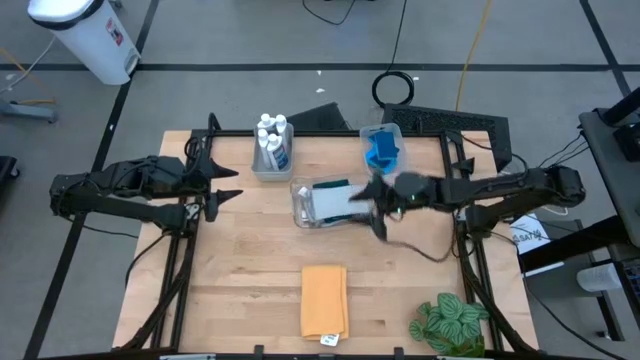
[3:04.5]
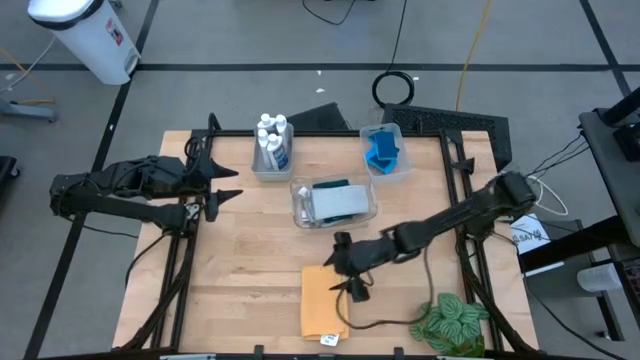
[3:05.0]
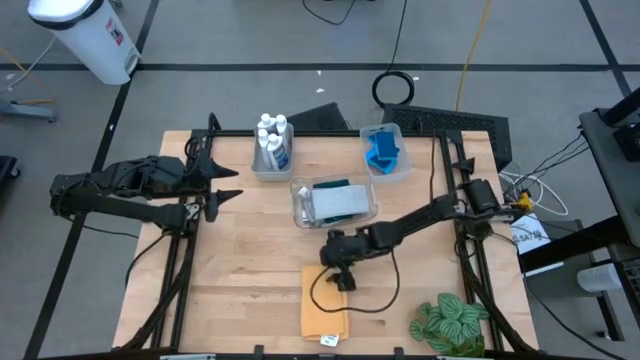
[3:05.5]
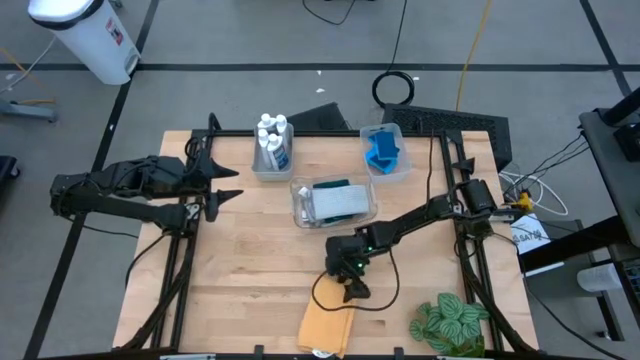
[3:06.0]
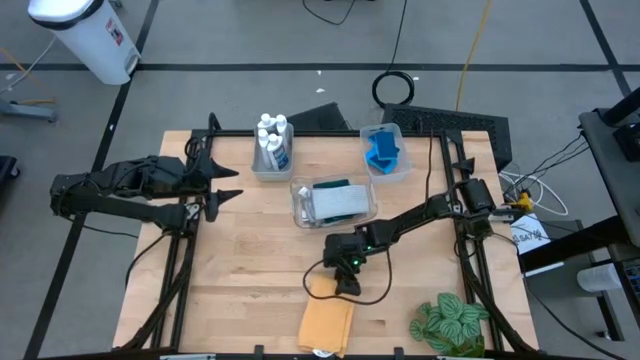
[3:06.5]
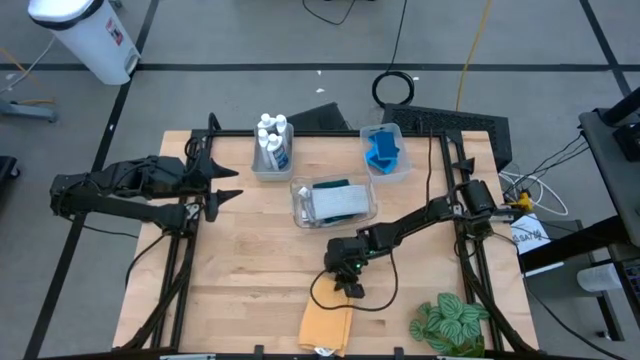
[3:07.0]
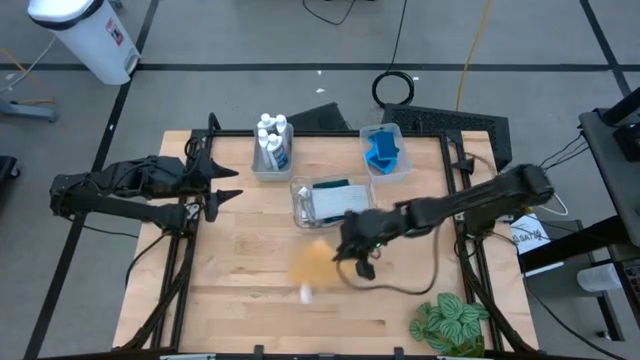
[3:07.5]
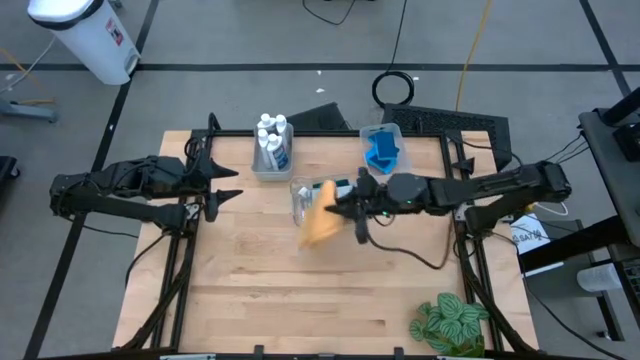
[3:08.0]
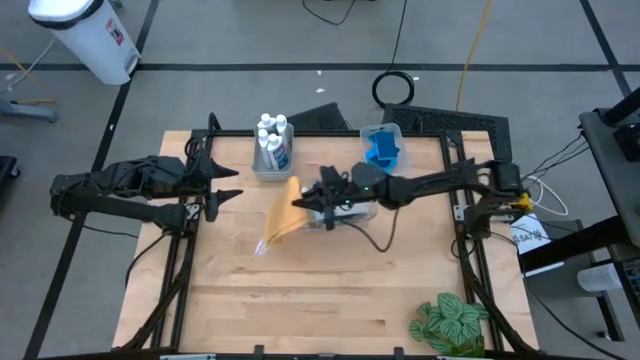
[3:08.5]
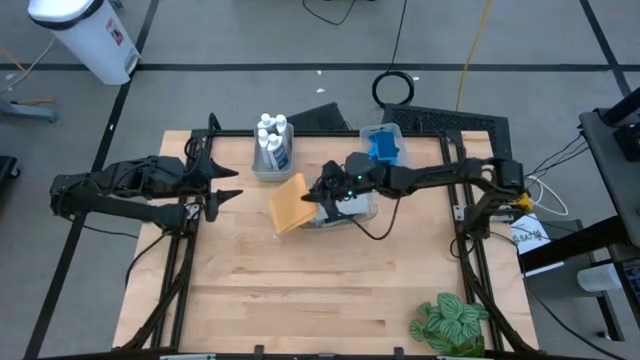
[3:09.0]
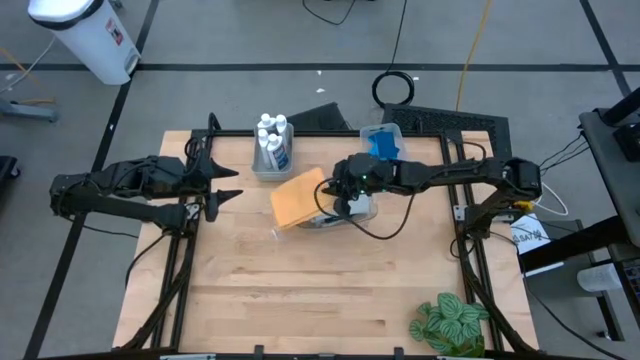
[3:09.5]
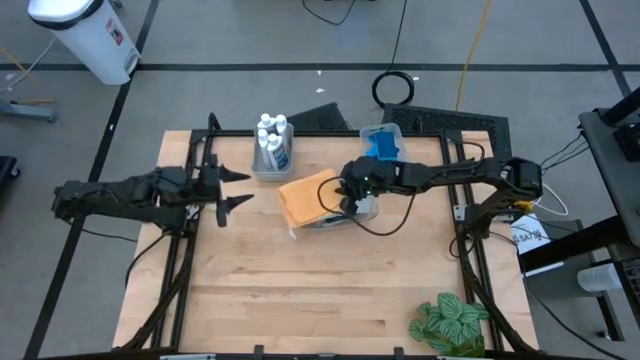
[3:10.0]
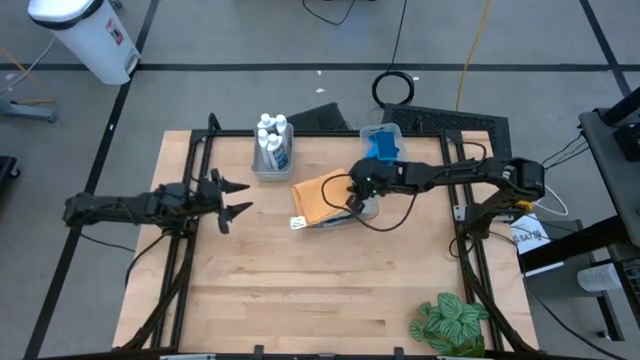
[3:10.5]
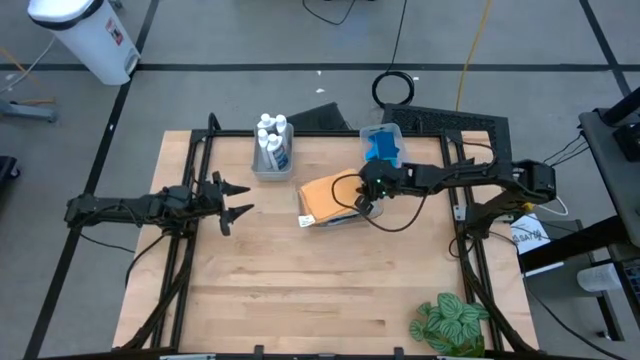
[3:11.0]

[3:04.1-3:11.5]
Task: Pick & Place Kitchen Items
Put the yellow towel into the transparent bin

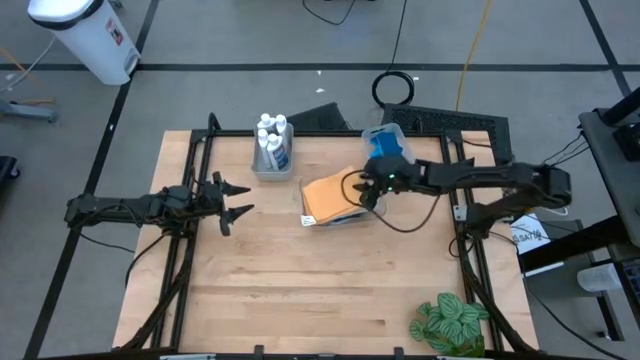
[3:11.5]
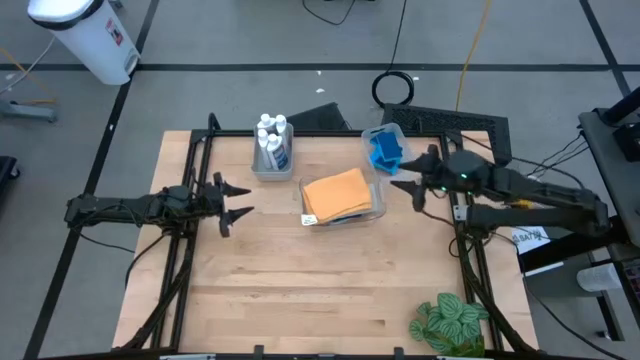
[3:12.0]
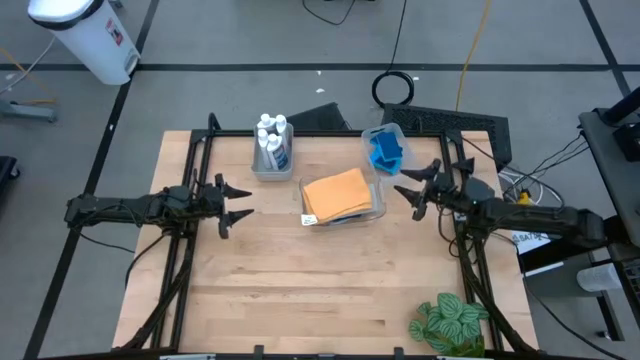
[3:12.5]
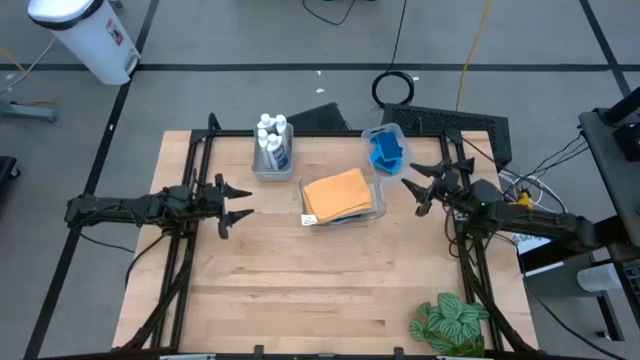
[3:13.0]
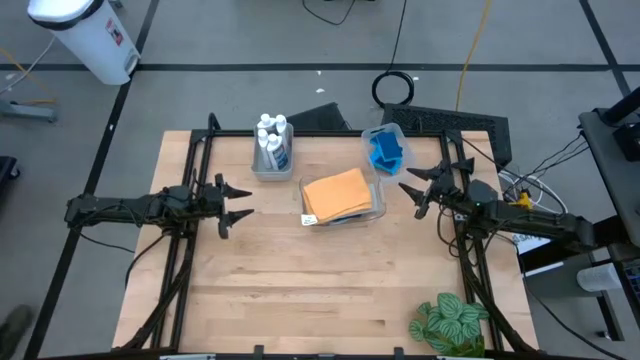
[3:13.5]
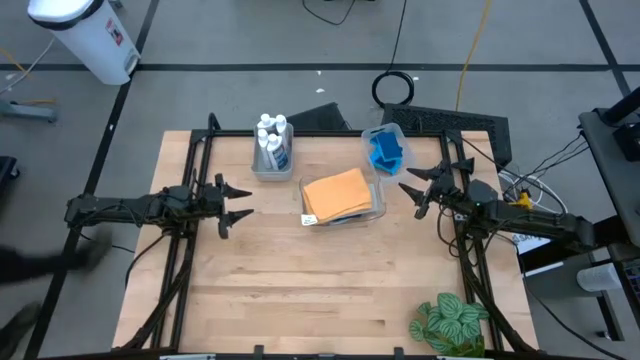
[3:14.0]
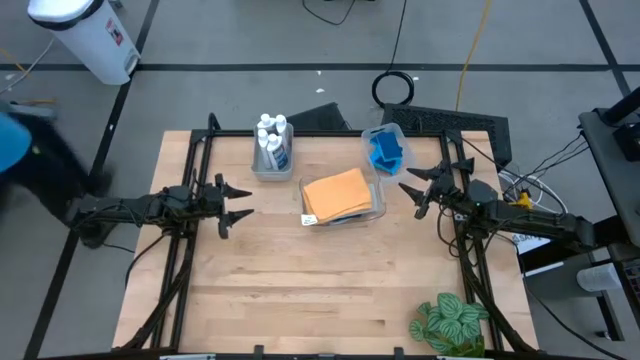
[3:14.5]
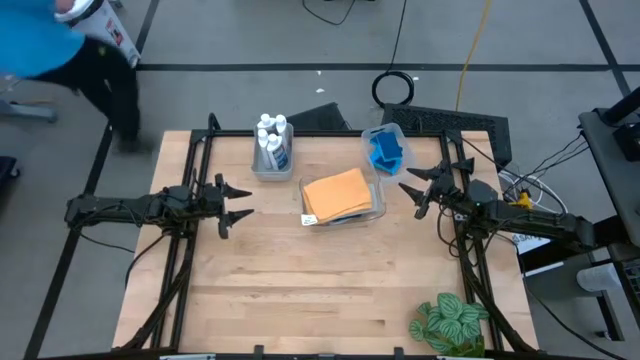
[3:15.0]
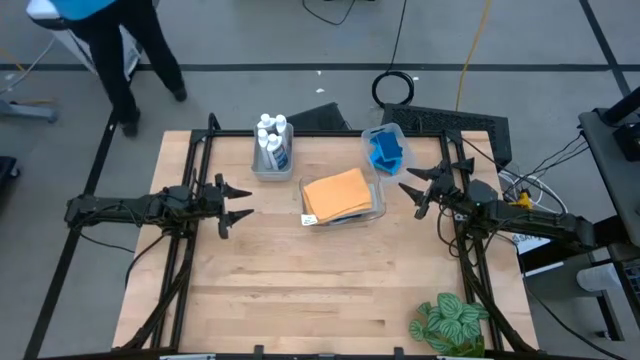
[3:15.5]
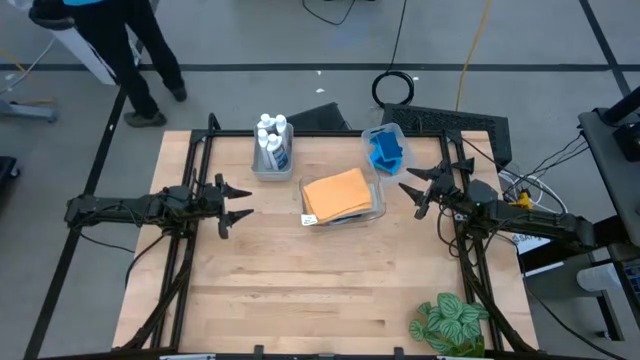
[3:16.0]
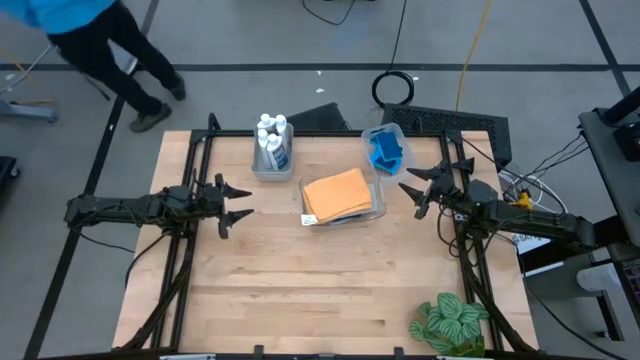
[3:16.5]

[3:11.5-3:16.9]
Return to Home Position

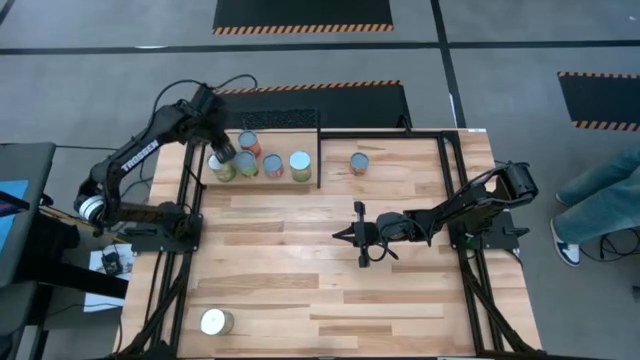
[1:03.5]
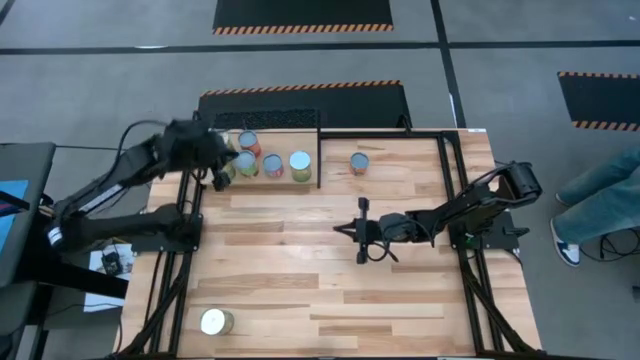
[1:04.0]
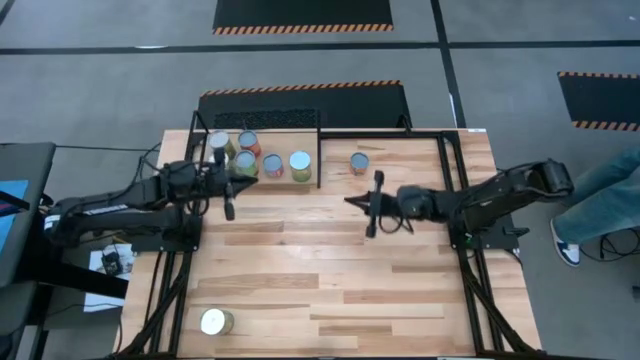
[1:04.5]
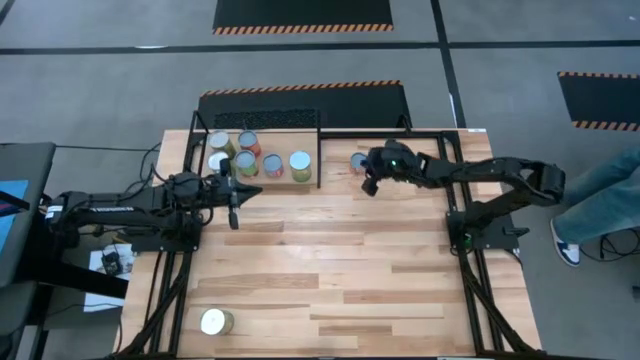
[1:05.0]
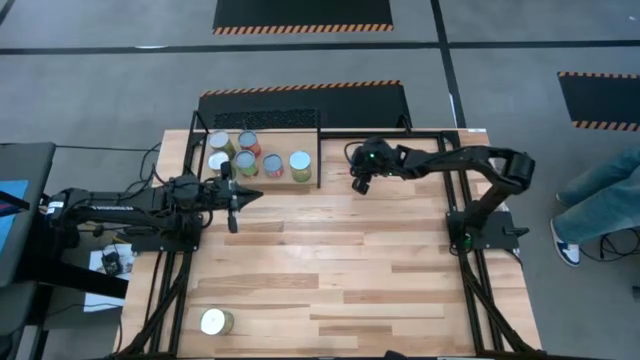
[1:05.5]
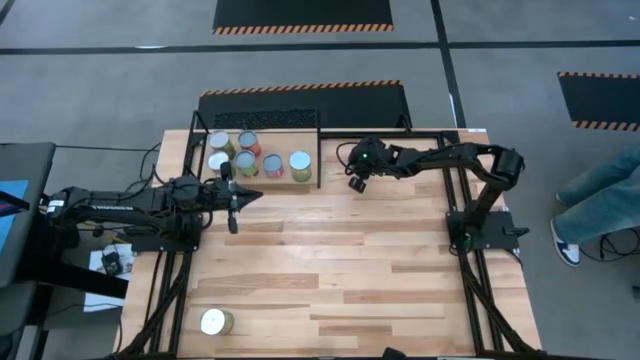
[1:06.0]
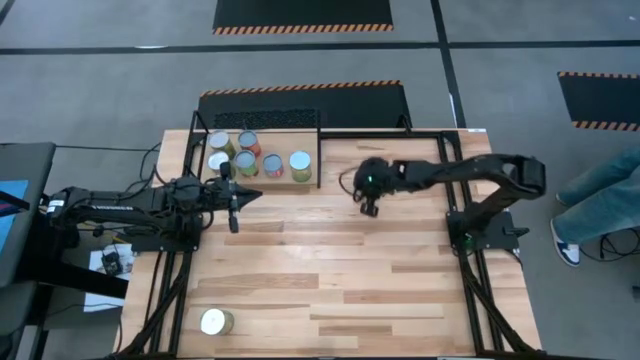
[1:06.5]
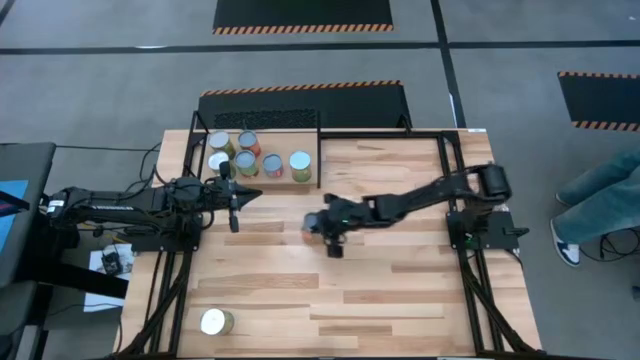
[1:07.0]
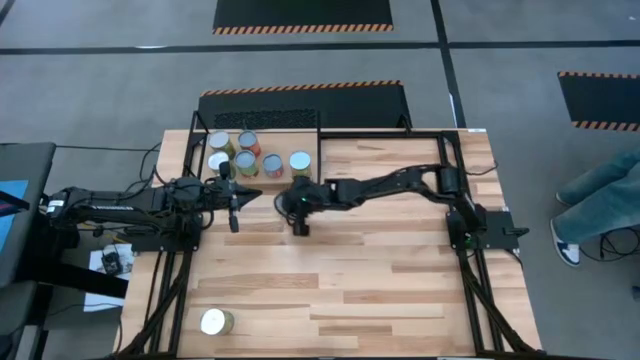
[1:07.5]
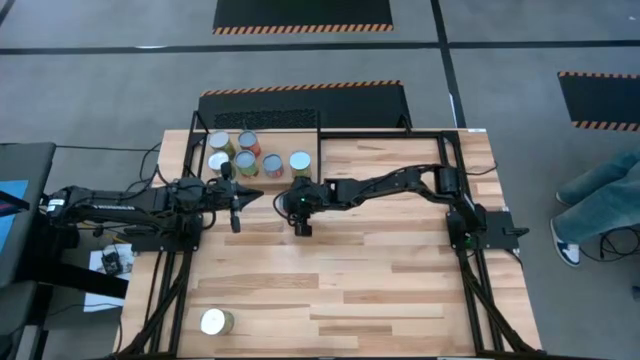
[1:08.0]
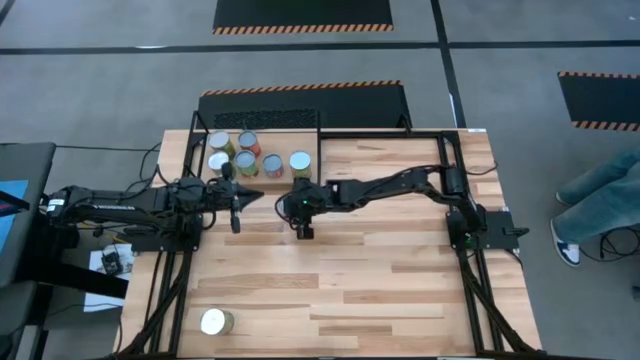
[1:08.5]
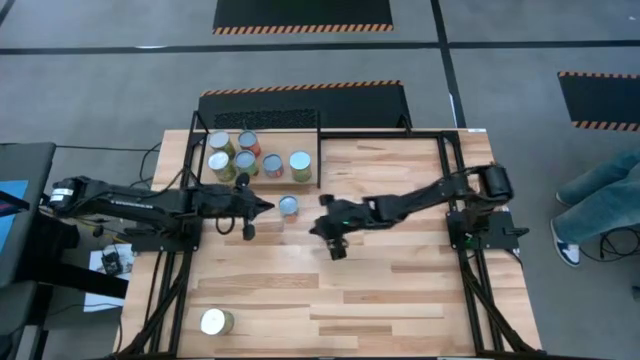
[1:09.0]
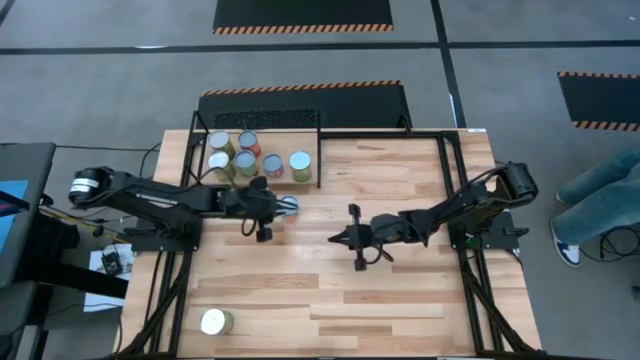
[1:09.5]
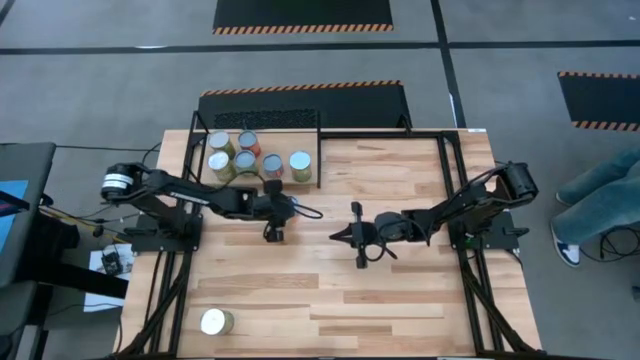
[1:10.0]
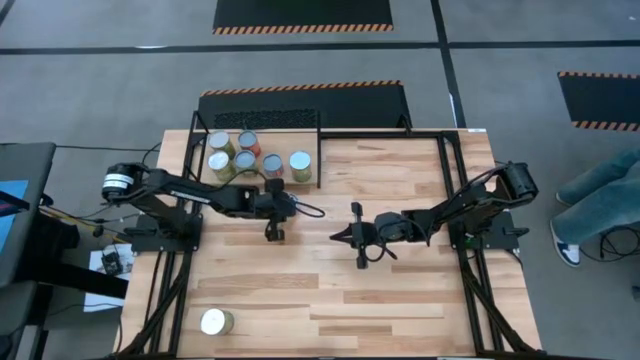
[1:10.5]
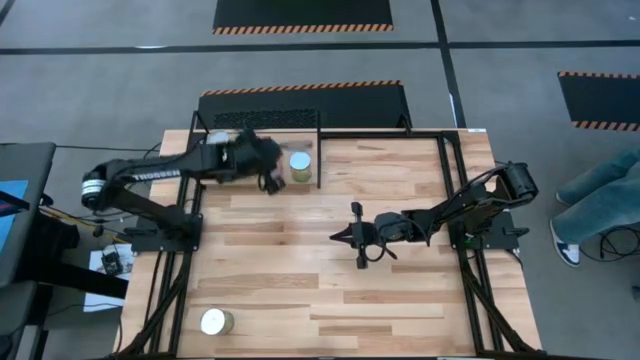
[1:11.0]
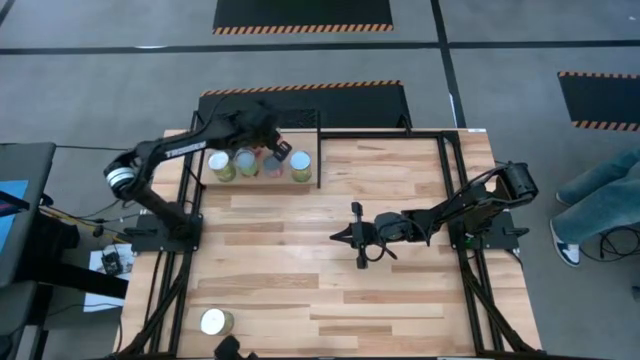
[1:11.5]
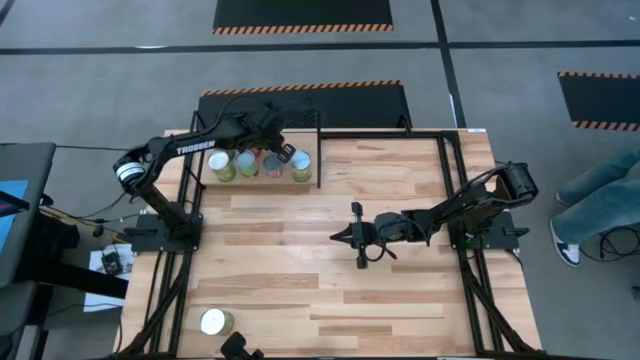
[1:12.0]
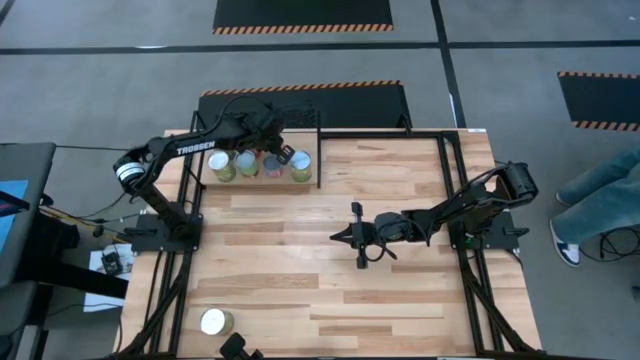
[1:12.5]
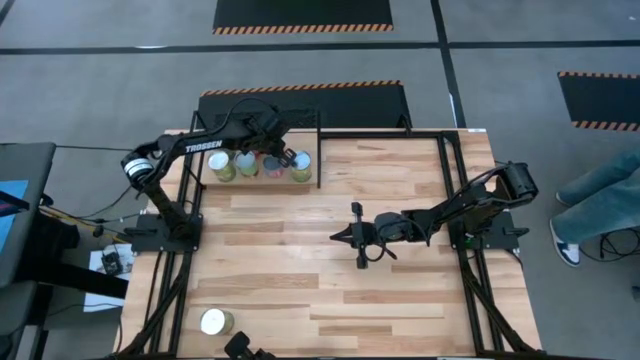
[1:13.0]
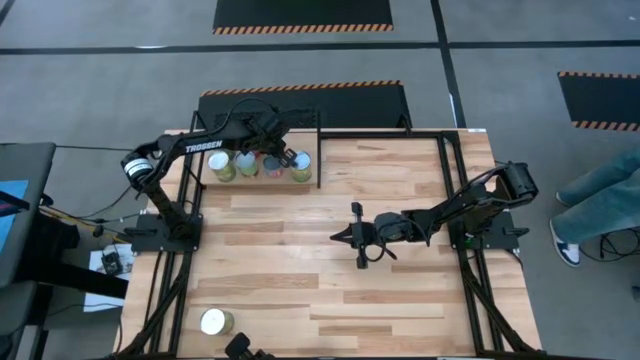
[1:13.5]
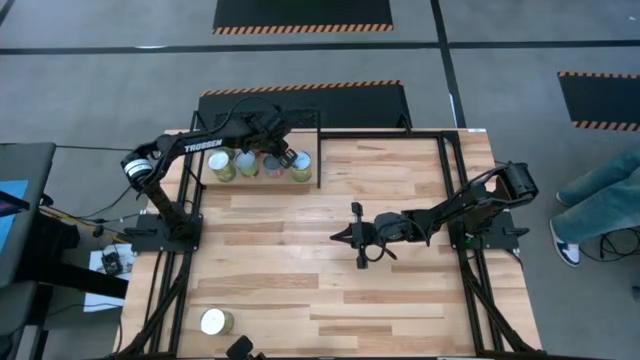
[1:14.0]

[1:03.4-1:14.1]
Task: Pick and place cans onto a shelf
Put the small canned oranges on the shelf
